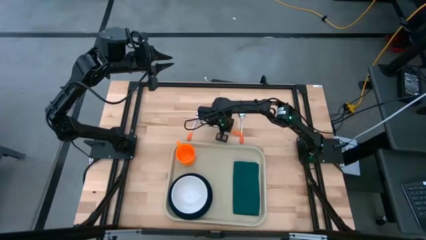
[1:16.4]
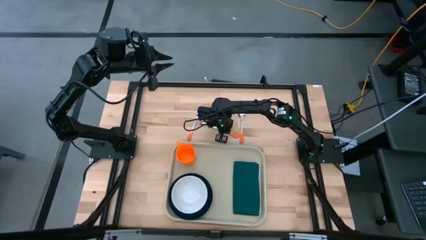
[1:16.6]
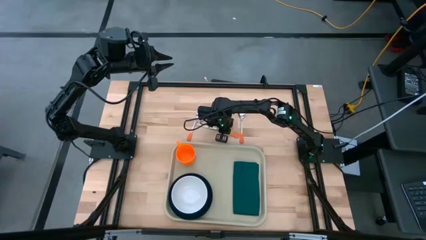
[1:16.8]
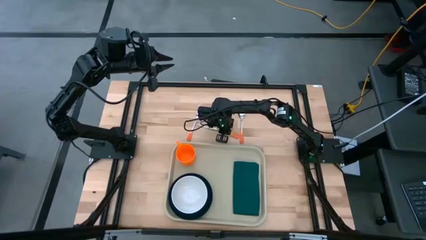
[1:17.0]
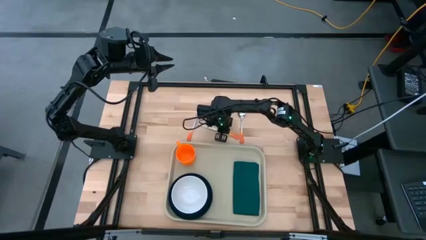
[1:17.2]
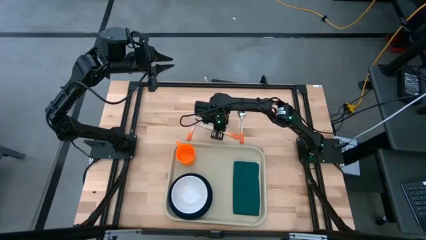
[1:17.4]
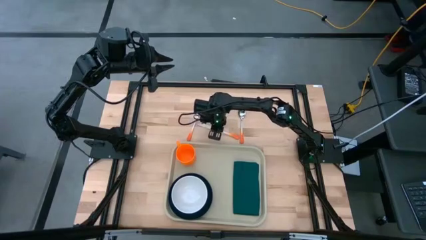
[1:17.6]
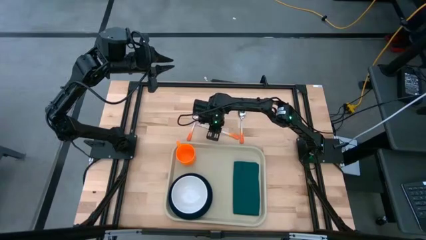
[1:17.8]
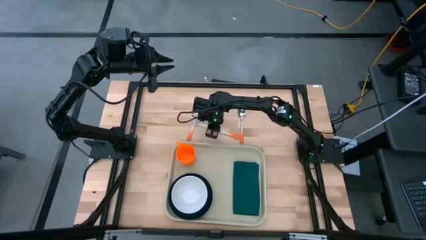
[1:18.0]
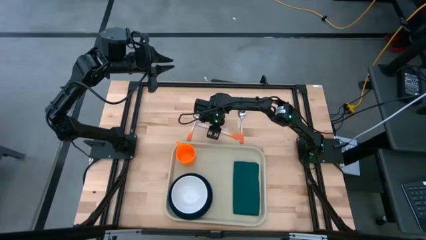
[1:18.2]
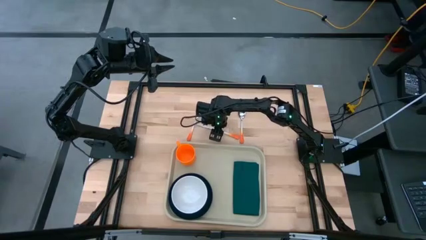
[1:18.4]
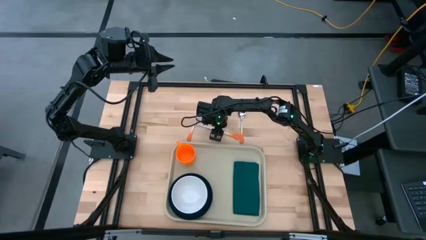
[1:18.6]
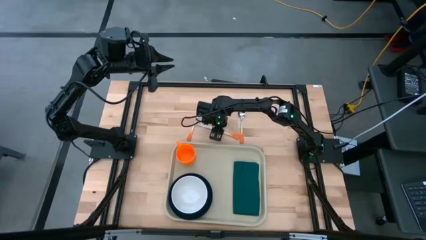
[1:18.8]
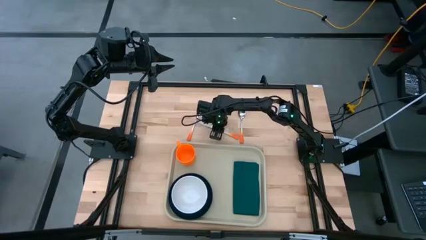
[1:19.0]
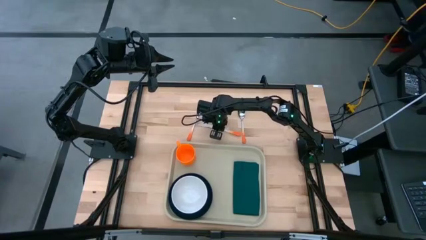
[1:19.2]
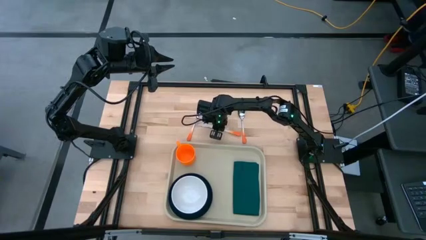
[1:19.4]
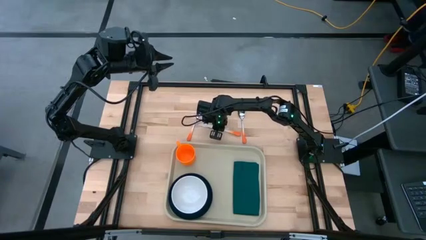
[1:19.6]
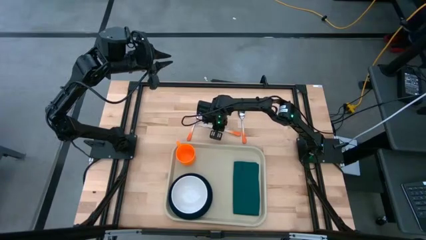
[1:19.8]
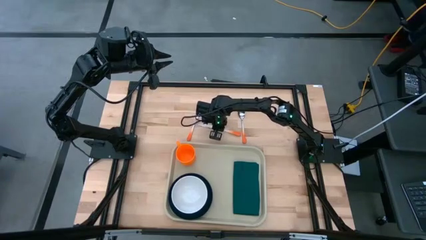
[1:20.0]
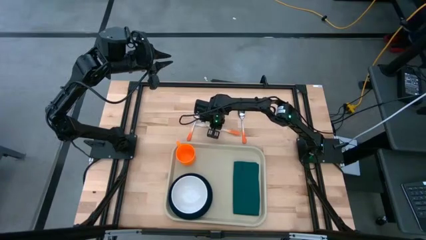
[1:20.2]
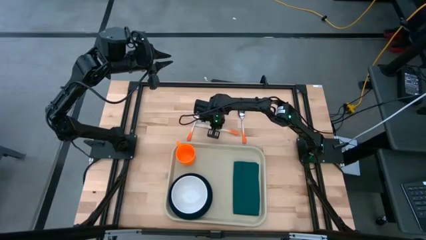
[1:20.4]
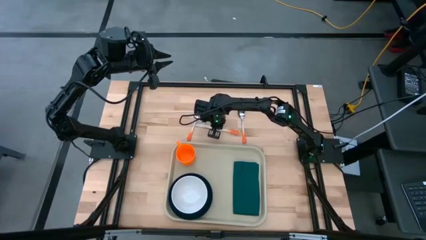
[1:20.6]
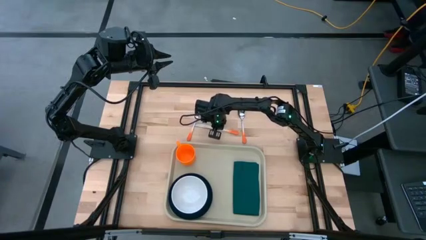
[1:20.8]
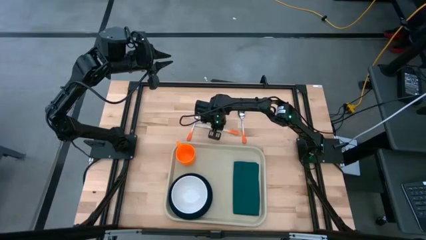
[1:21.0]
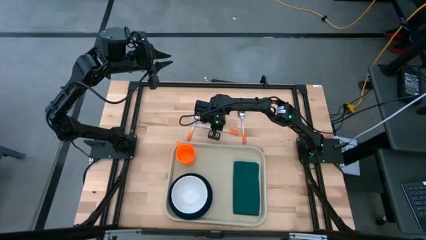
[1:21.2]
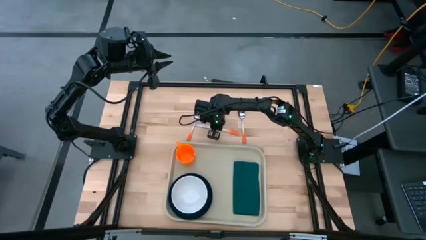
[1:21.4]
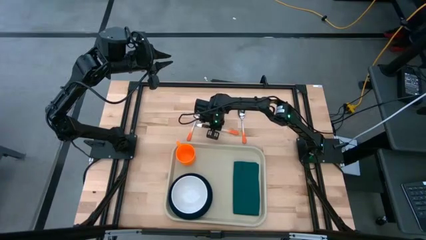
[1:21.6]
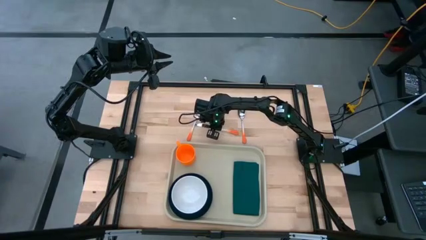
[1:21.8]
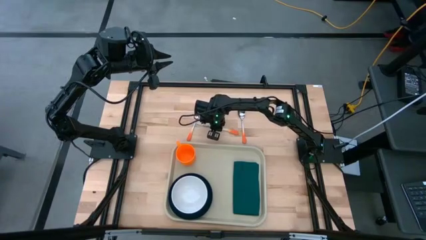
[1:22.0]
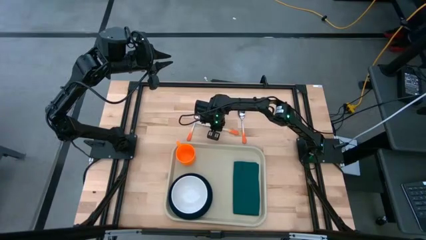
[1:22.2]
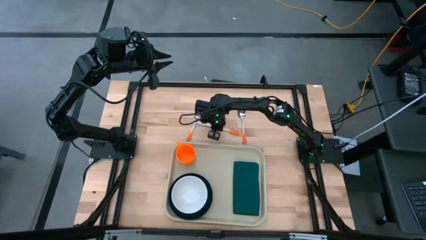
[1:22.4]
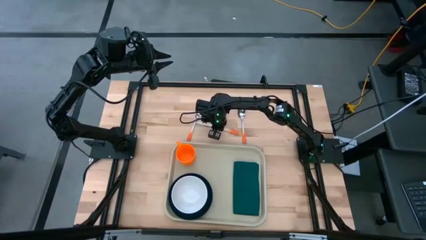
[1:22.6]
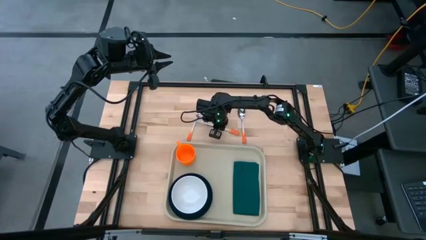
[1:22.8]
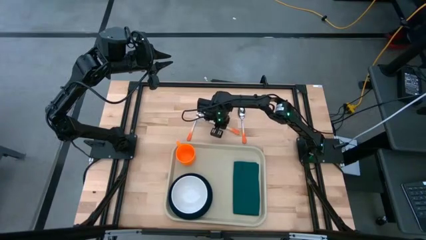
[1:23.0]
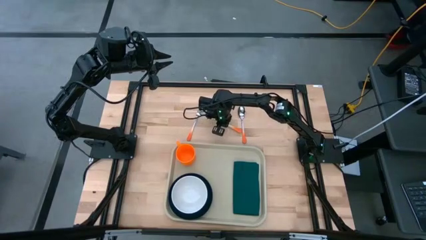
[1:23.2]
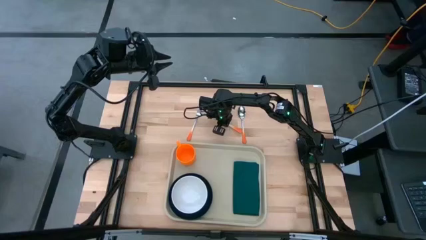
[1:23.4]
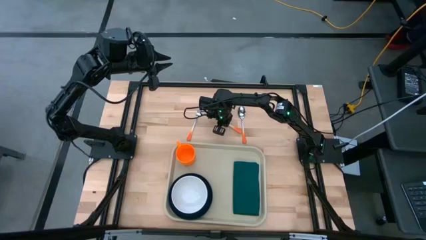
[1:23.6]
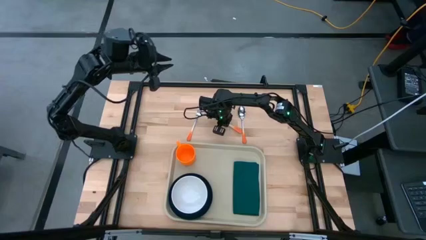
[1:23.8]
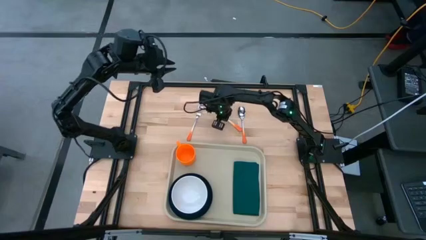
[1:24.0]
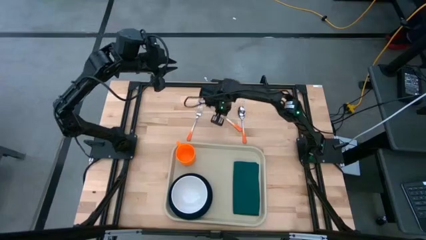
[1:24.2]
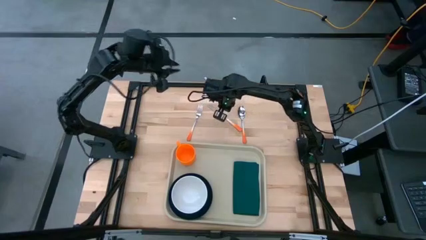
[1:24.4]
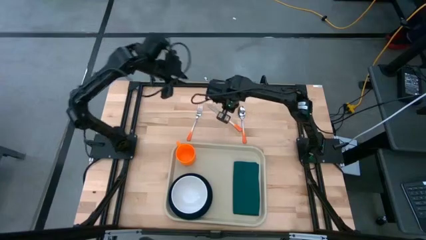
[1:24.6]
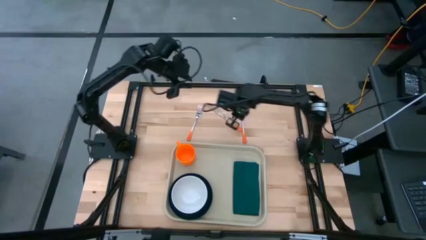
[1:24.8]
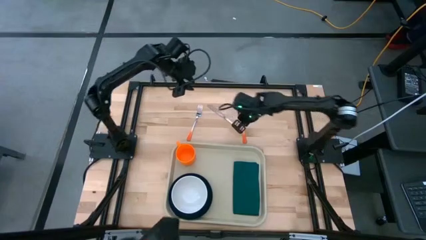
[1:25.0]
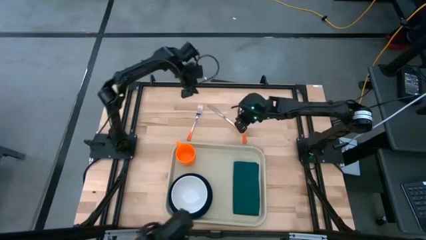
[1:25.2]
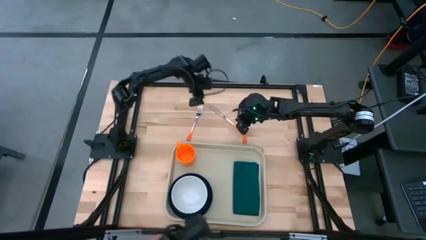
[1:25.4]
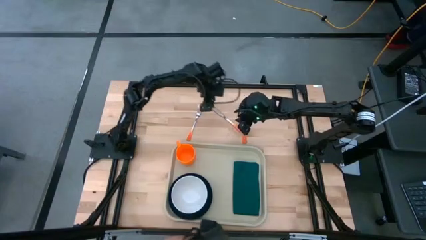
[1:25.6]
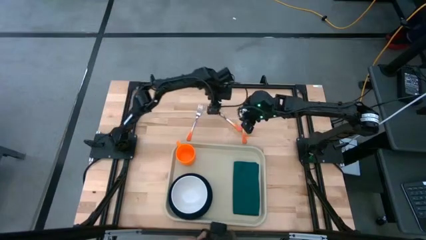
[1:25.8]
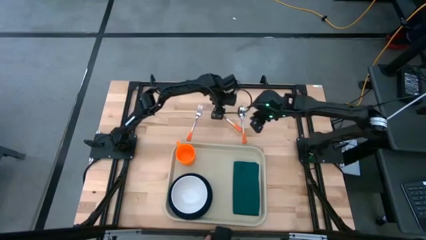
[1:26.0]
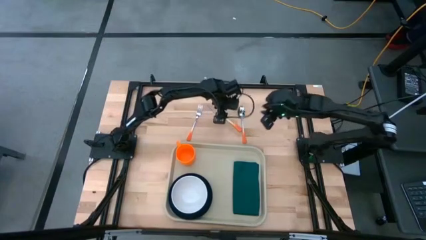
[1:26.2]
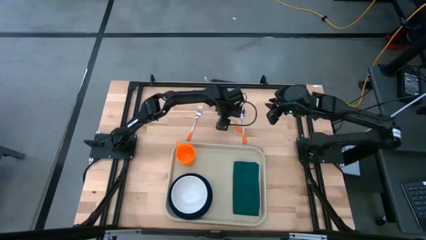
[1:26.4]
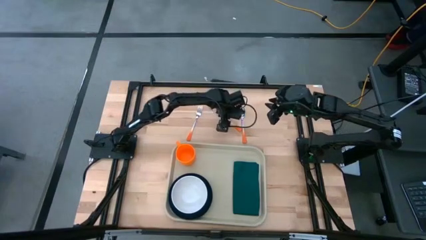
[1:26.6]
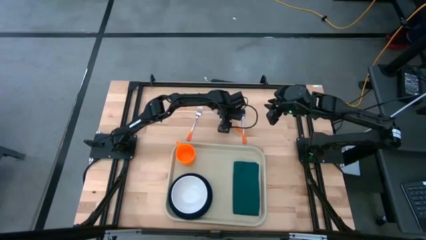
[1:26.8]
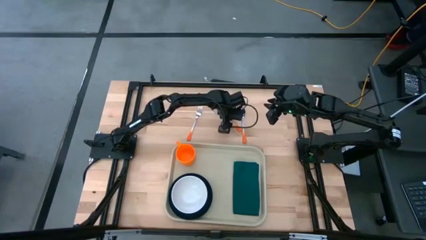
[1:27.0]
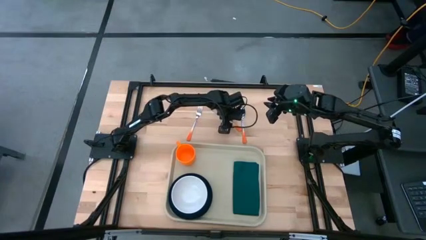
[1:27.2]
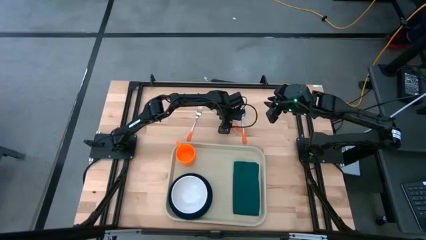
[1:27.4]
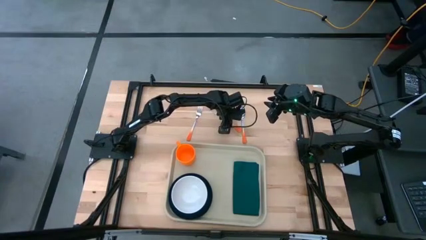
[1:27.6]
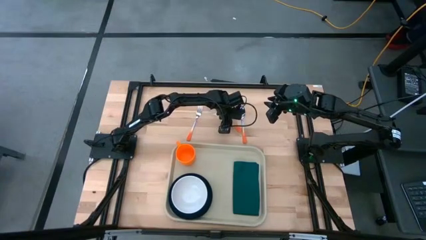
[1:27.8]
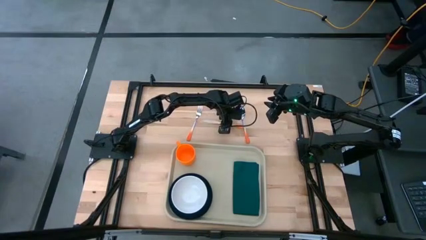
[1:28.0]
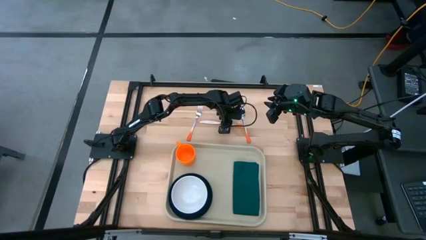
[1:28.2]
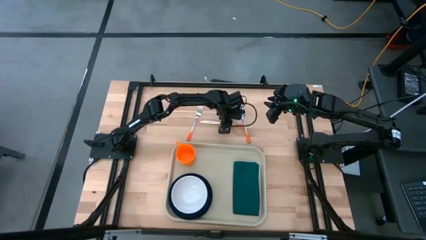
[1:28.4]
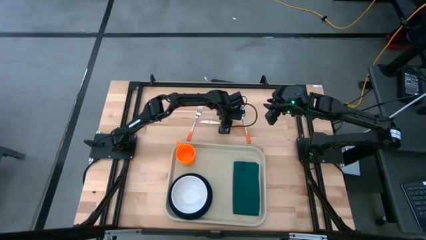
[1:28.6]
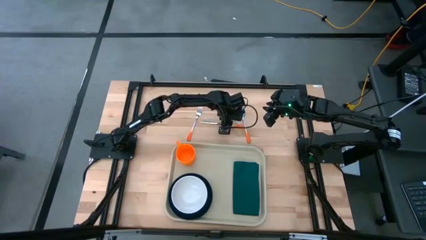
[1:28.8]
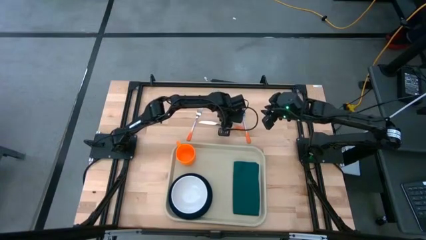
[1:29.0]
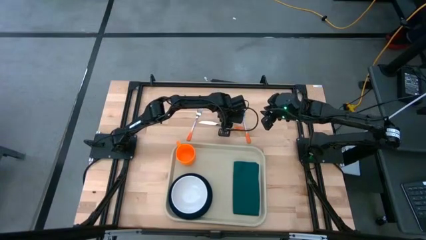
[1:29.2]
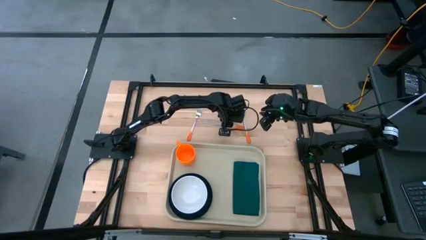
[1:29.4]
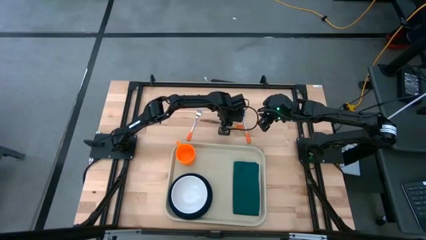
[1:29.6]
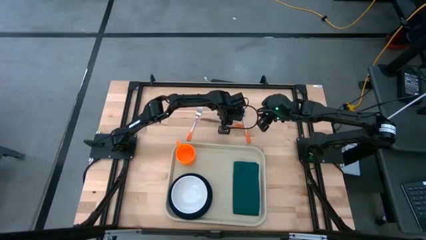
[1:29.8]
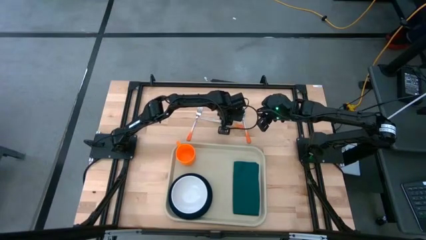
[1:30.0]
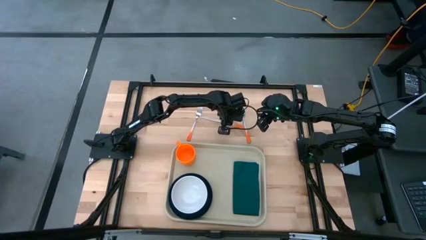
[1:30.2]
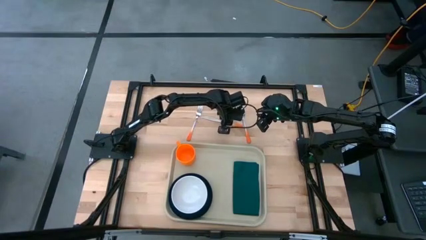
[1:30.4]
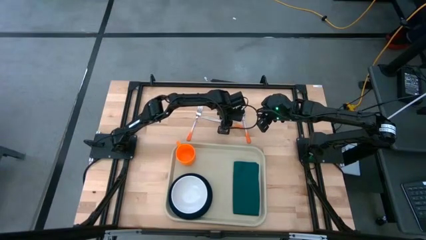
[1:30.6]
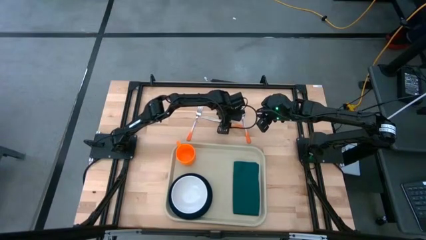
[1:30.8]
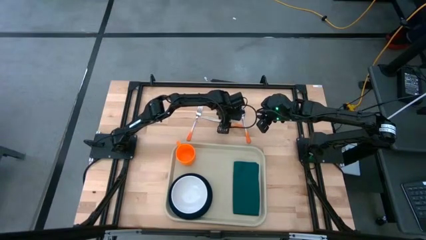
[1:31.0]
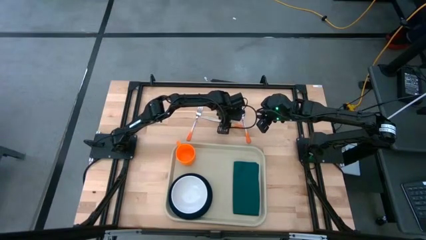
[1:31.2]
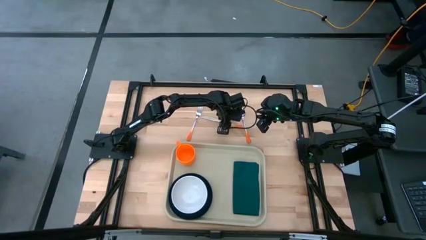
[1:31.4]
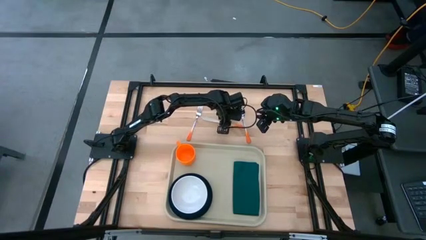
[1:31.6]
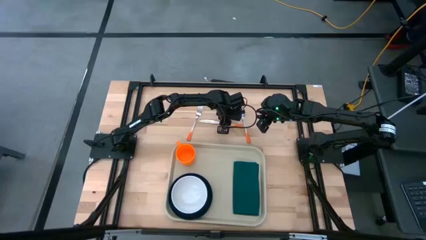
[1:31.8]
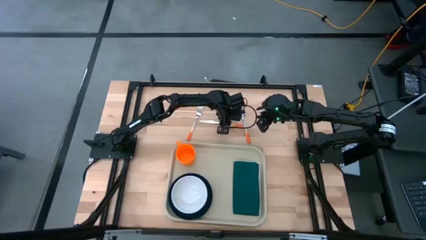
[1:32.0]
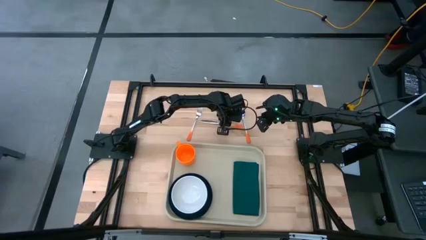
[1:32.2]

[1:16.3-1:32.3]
Task: Set up tray
Put the knife on the napkin
